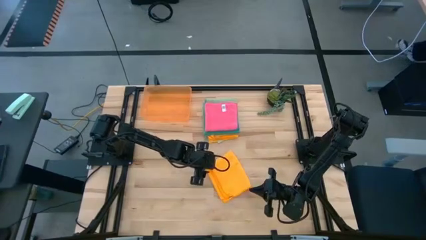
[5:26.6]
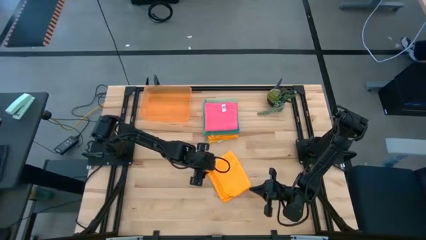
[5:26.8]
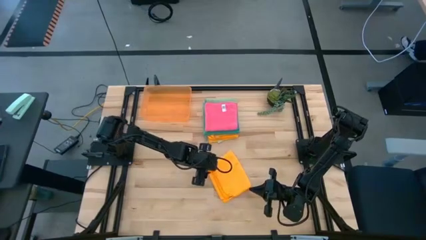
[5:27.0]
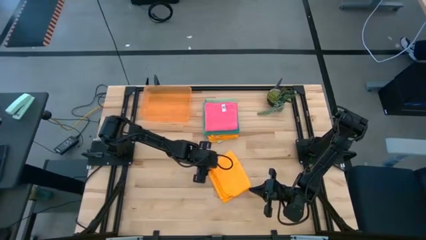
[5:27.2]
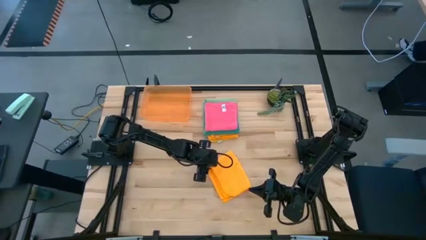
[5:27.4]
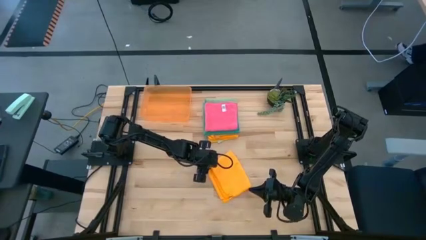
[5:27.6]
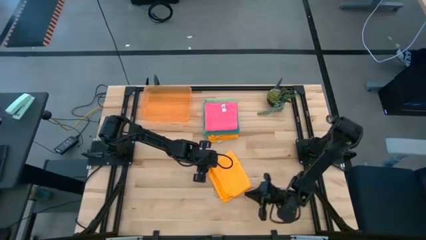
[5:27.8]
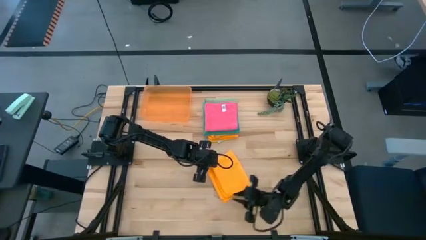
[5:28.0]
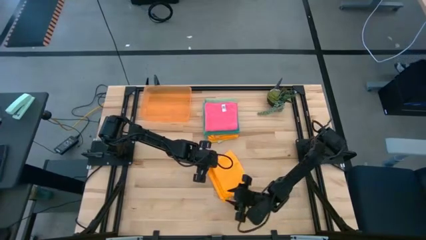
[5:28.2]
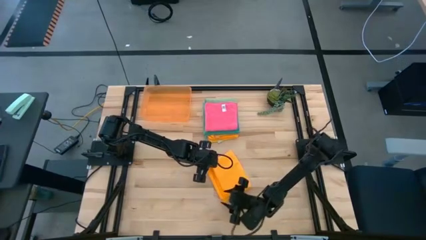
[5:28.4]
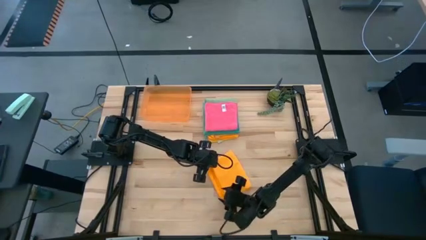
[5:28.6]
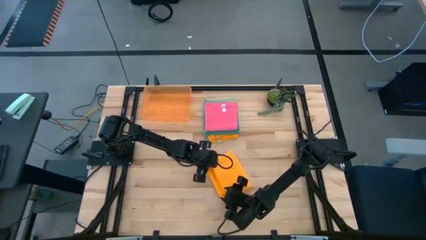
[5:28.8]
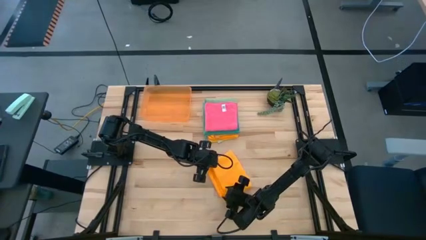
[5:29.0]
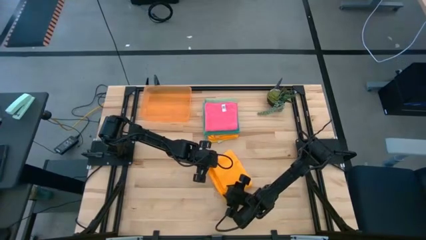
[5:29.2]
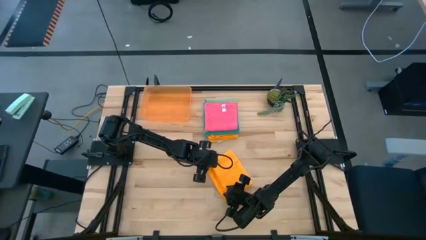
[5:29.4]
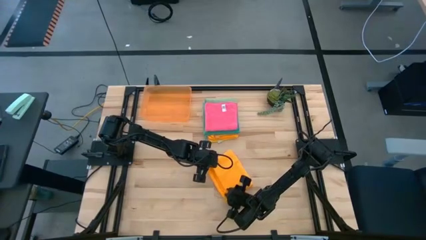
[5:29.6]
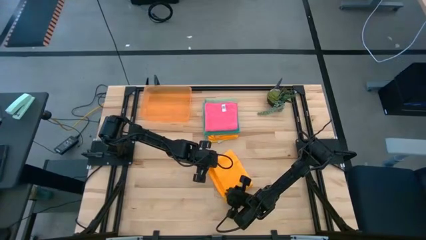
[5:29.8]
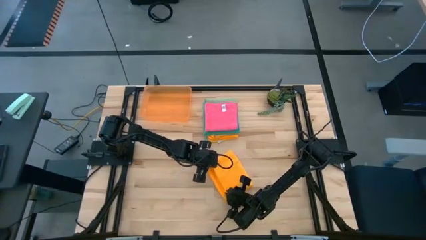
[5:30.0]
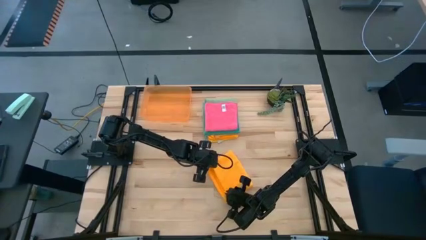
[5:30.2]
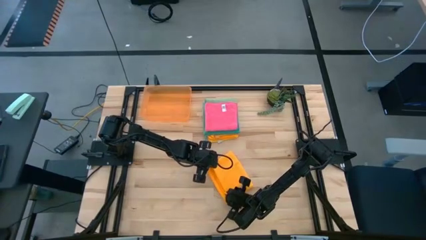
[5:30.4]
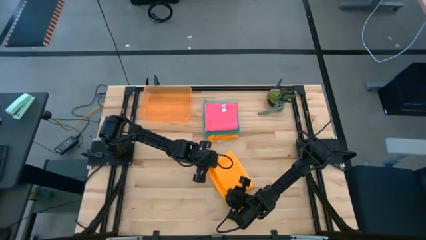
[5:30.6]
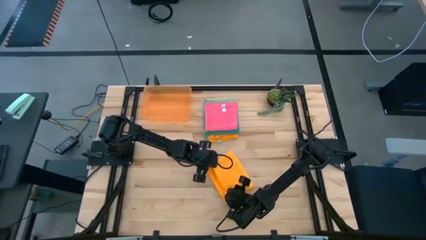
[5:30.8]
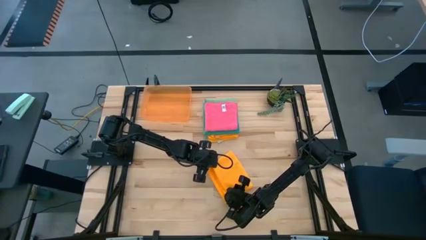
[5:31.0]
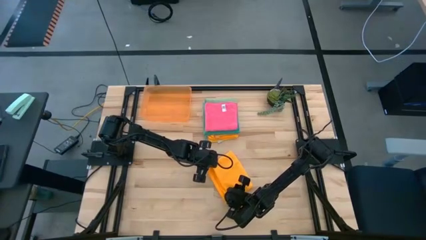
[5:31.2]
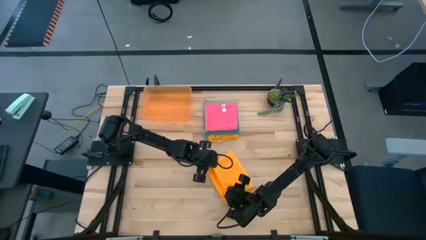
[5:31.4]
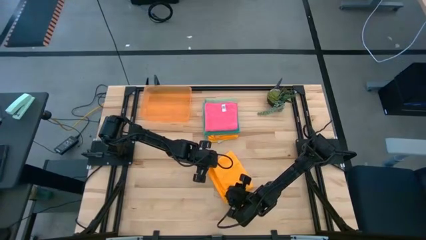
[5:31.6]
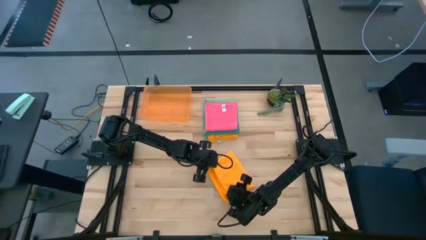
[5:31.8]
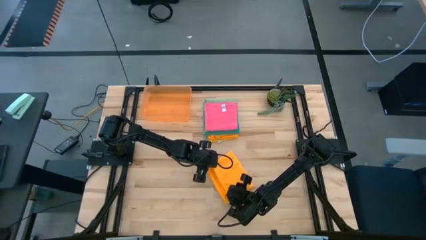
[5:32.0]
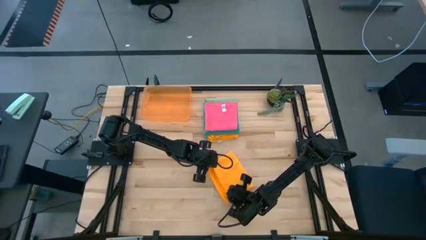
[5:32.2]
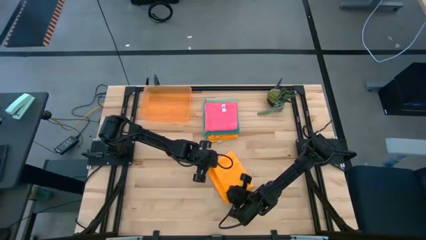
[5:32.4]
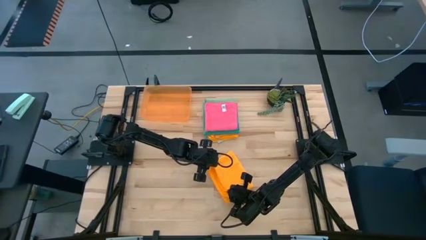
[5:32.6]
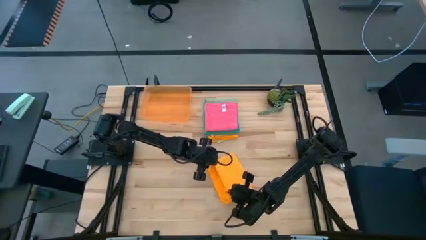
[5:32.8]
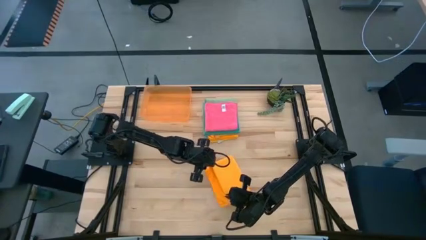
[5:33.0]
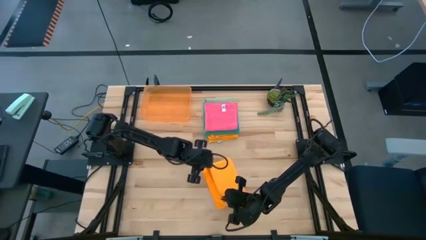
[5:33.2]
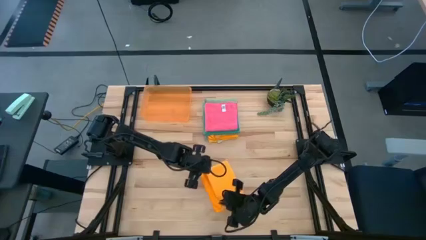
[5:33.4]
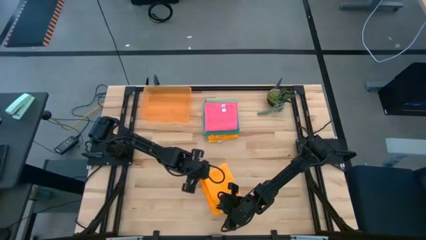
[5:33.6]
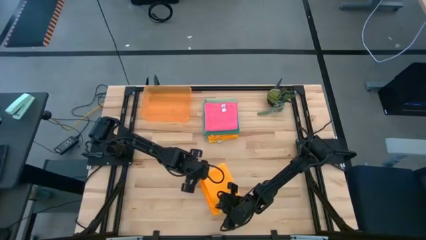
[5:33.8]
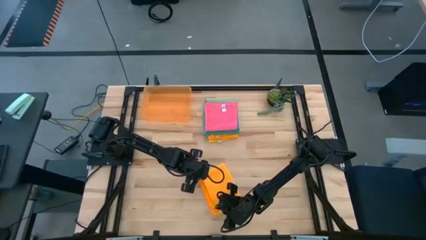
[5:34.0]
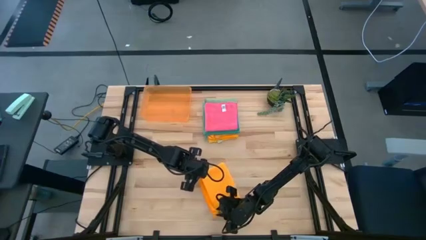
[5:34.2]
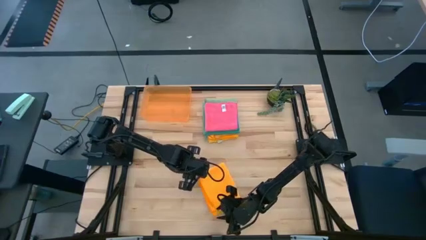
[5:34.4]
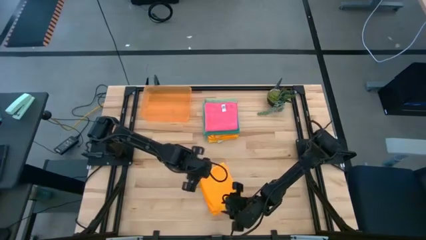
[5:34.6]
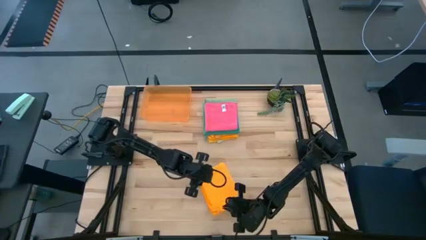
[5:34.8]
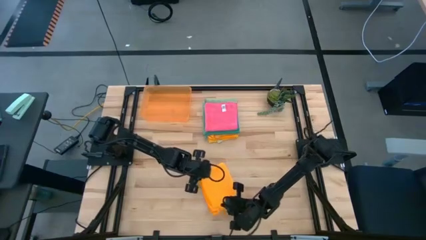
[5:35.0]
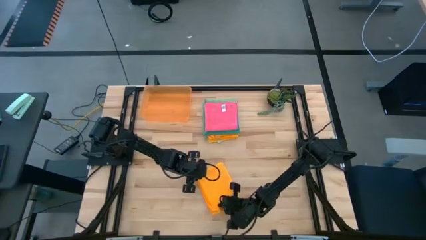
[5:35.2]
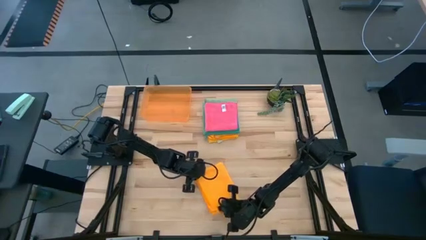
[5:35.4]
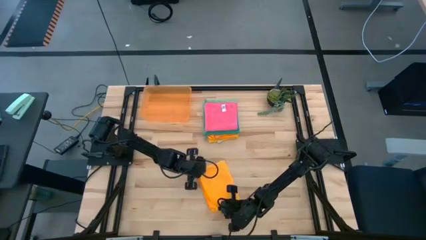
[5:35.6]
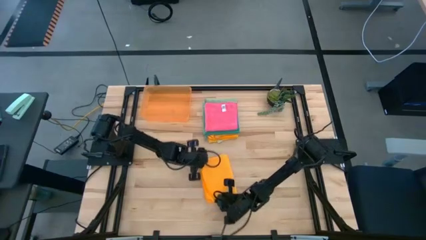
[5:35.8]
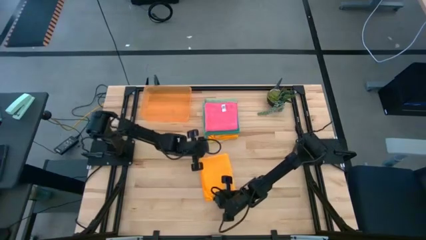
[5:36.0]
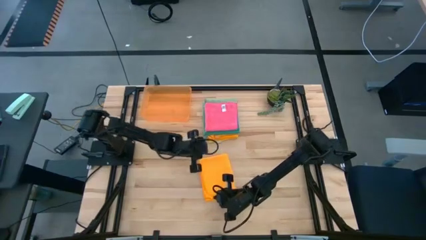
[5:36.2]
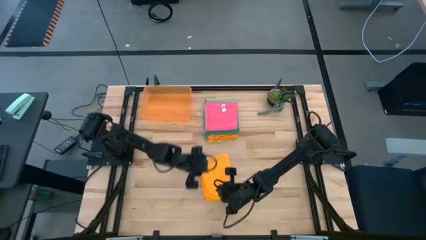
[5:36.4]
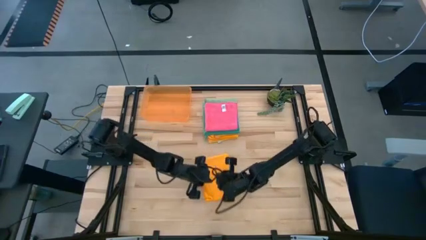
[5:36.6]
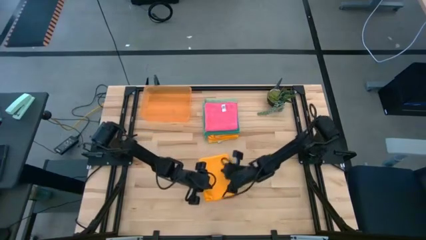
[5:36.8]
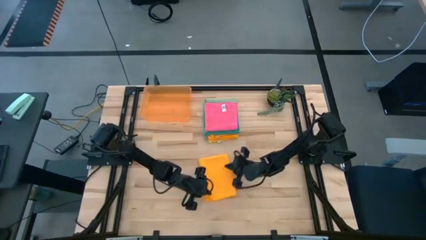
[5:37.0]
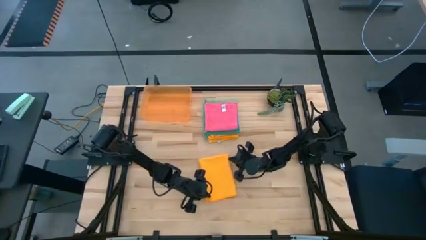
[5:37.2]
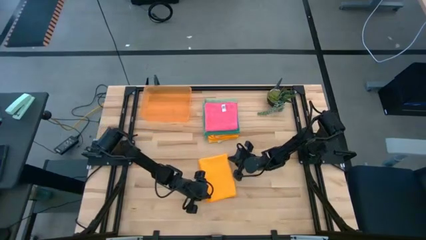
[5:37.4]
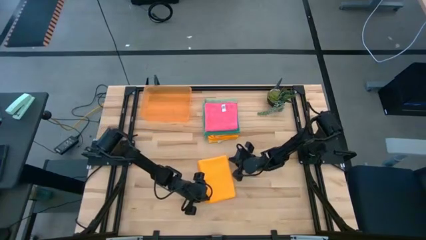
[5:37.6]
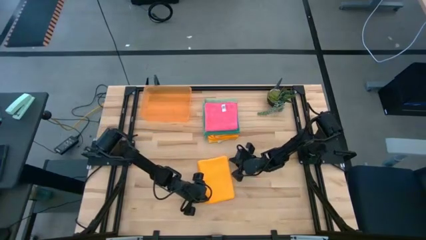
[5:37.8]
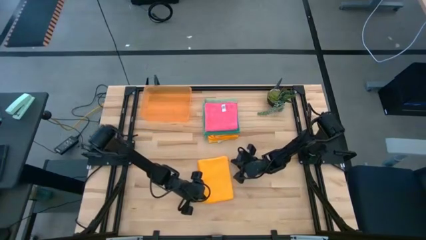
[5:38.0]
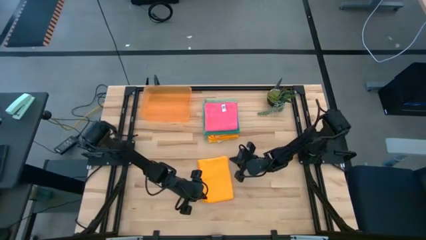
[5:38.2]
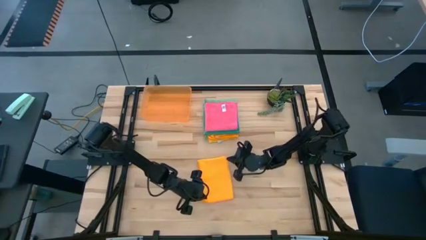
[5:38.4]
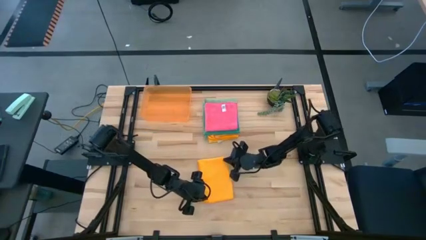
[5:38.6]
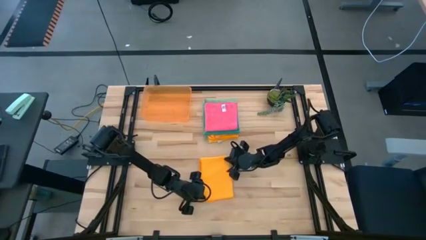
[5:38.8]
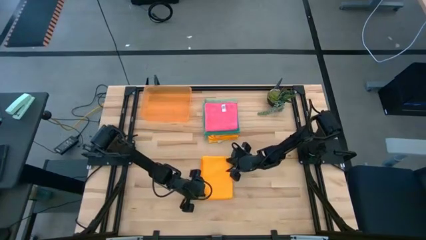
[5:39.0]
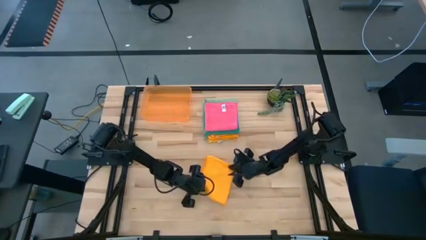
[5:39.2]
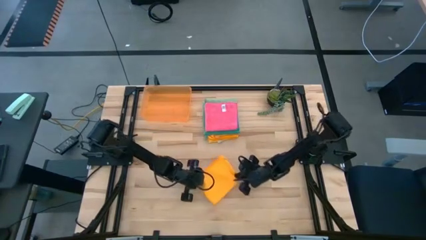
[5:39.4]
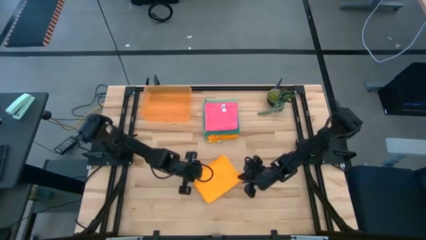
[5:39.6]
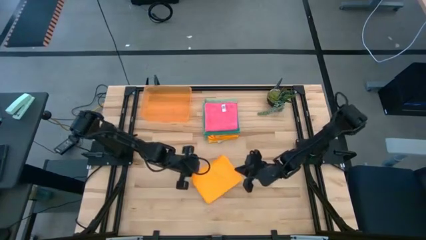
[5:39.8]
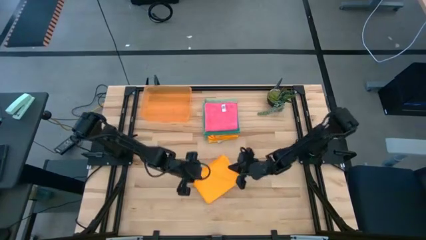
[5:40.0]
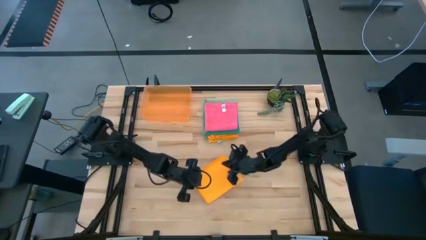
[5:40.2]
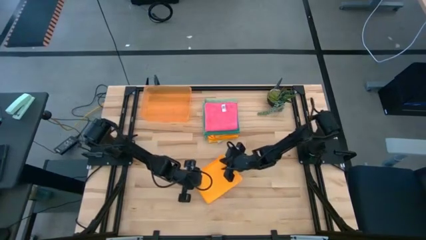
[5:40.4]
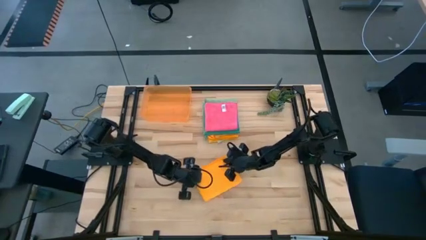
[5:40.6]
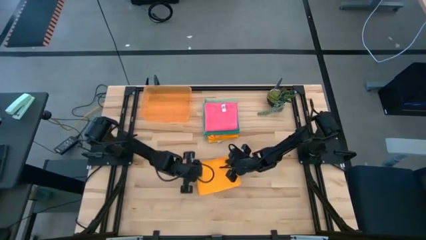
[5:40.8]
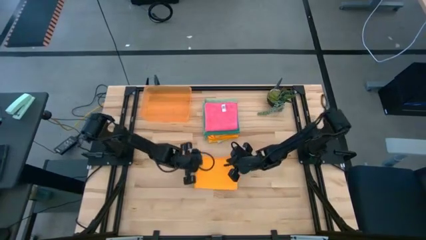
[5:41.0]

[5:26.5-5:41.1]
Task: Fold microfiber towels
Fold the orange towel

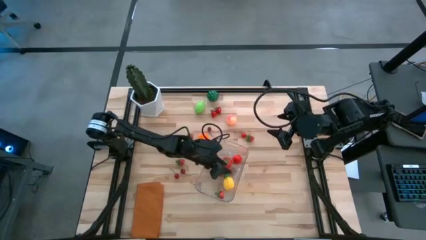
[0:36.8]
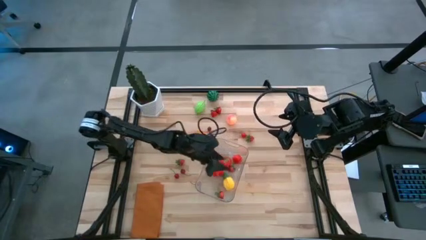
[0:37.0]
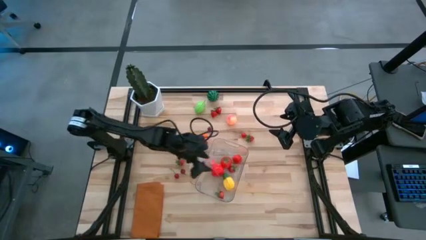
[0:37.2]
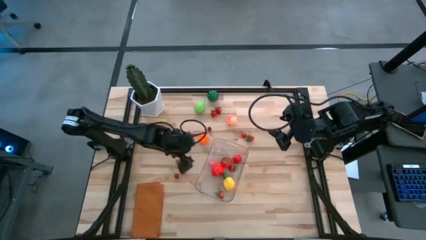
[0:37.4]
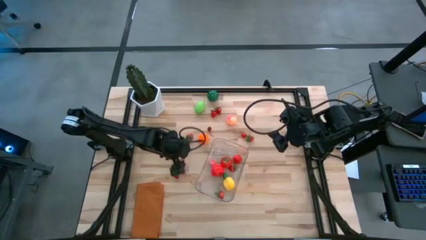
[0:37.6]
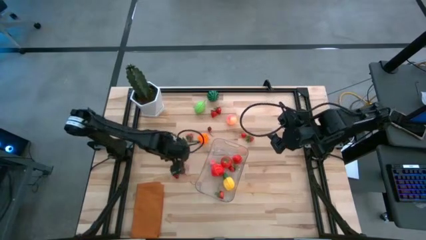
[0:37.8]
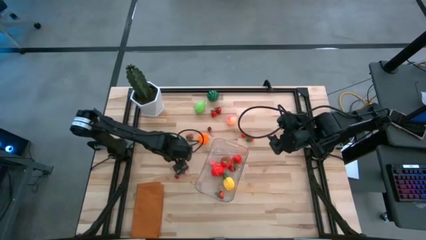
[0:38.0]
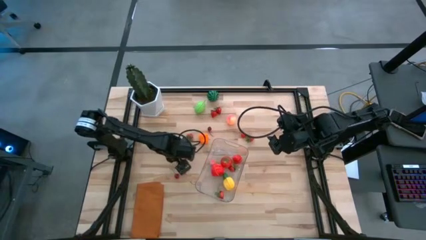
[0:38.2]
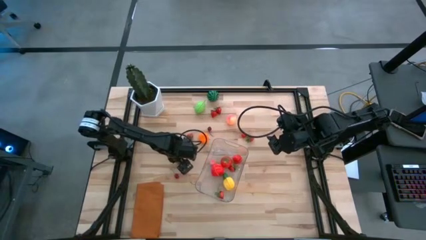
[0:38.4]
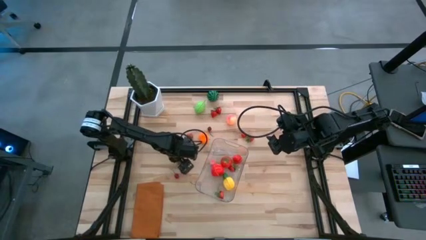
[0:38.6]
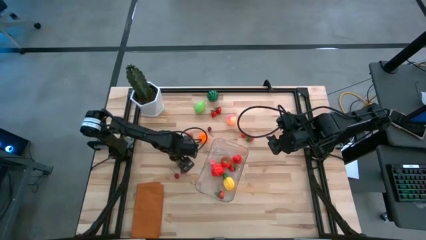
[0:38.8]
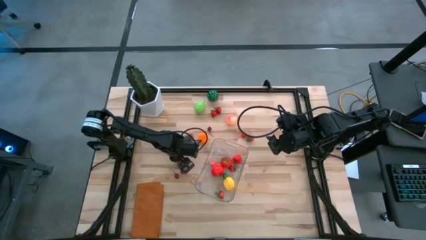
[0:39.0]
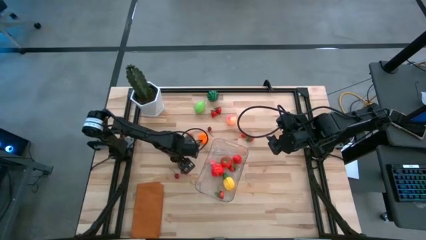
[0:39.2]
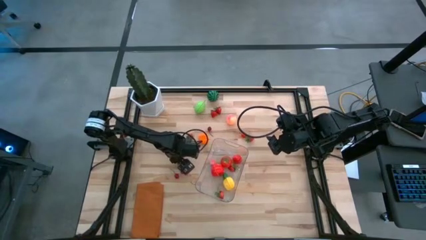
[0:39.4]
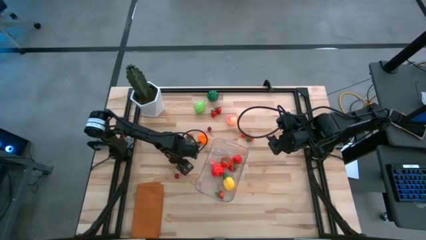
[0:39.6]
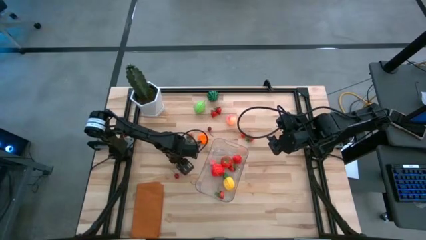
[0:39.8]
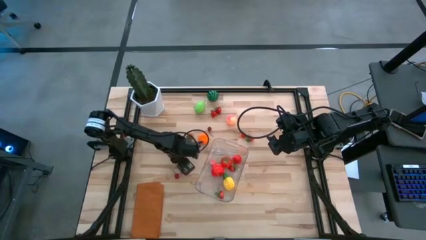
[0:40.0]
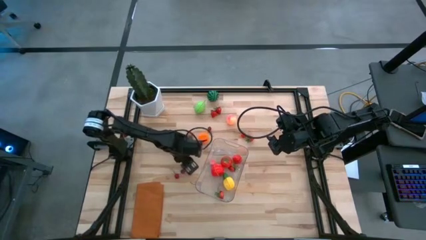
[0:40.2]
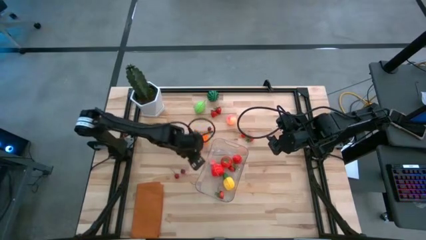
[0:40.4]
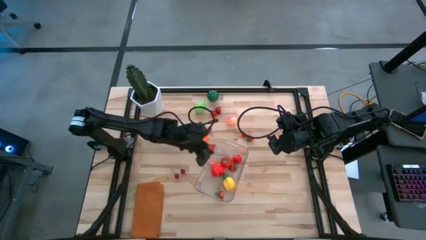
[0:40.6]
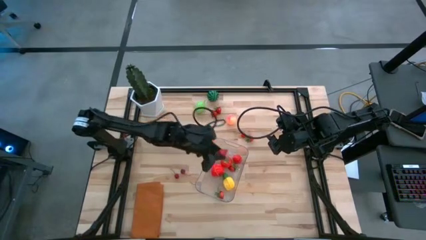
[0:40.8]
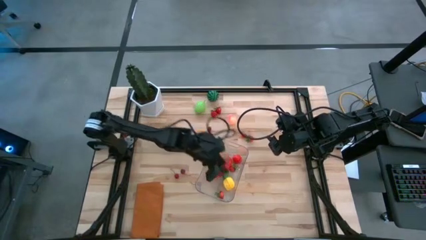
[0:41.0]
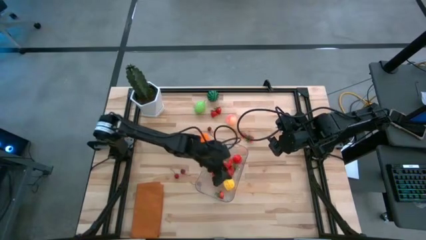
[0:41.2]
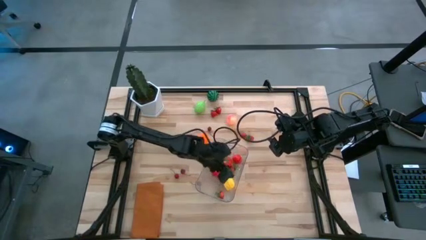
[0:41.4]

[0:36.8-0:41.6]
Task: Pick and placing Produce into tupperware
Put the red strawberry into the transparent bin
